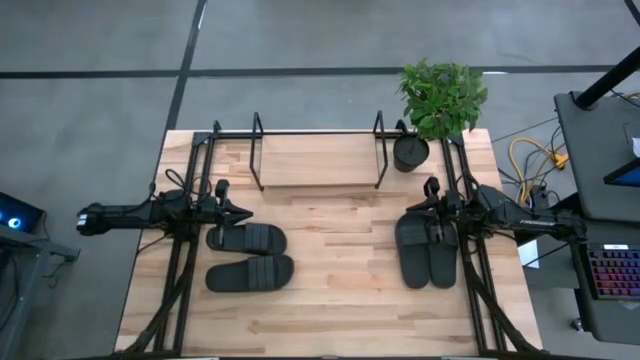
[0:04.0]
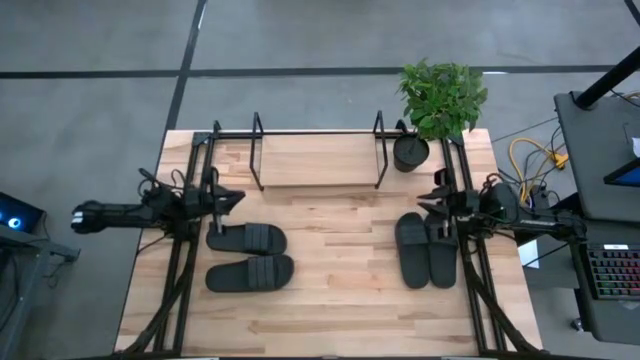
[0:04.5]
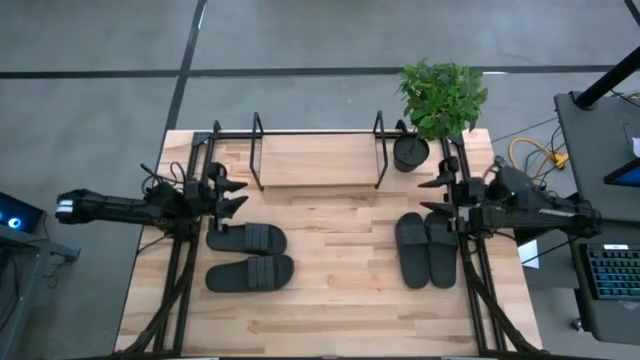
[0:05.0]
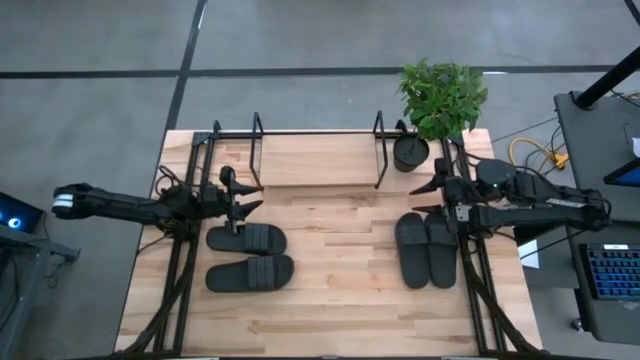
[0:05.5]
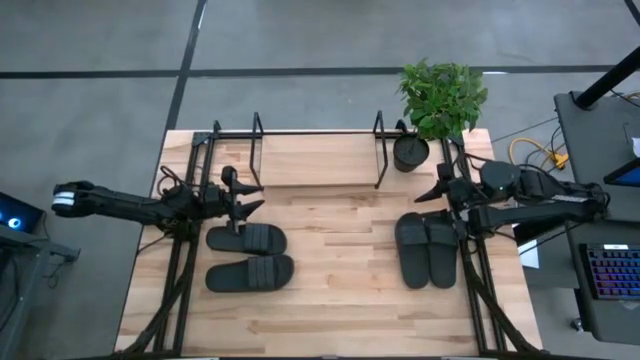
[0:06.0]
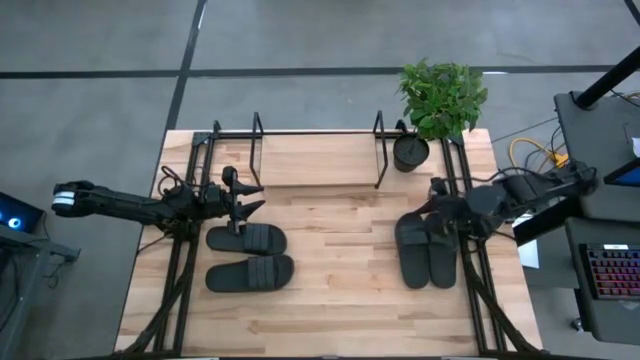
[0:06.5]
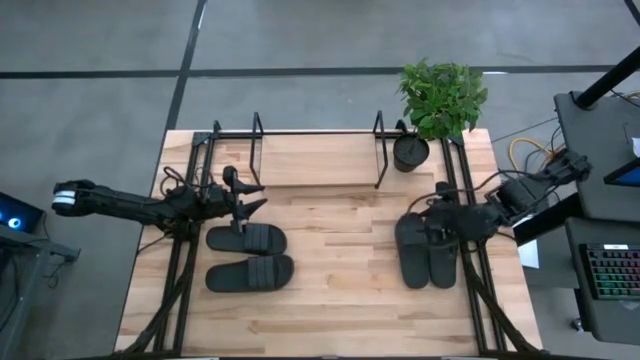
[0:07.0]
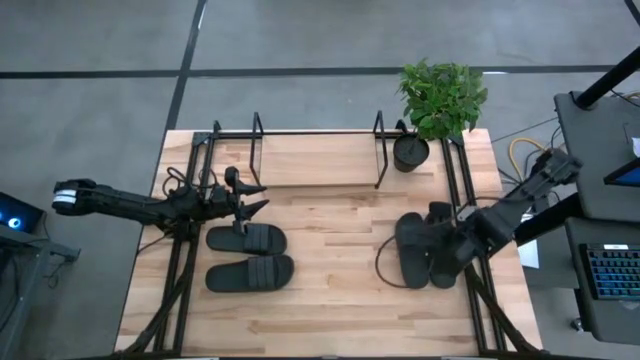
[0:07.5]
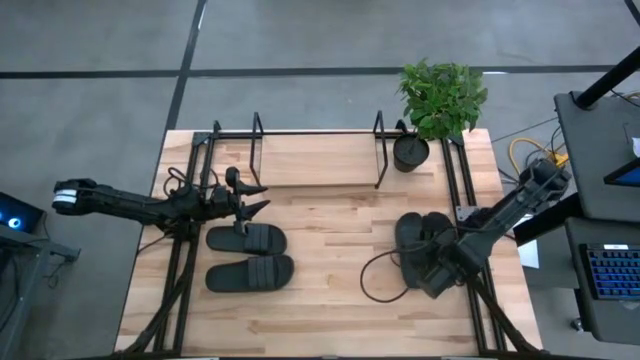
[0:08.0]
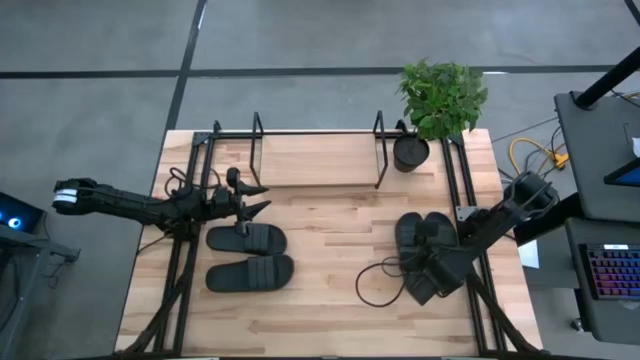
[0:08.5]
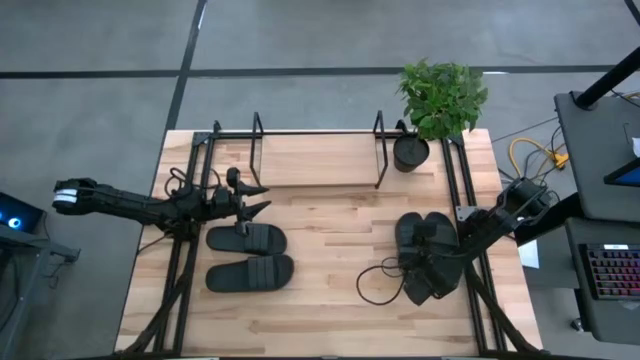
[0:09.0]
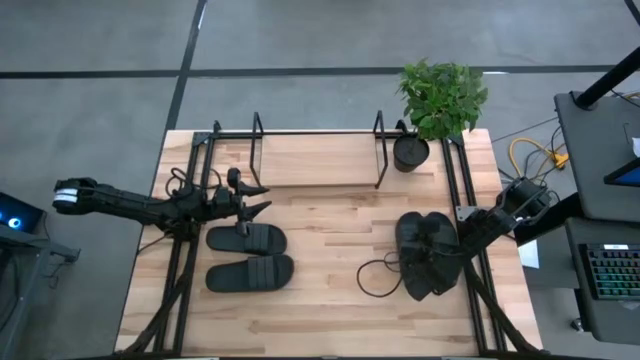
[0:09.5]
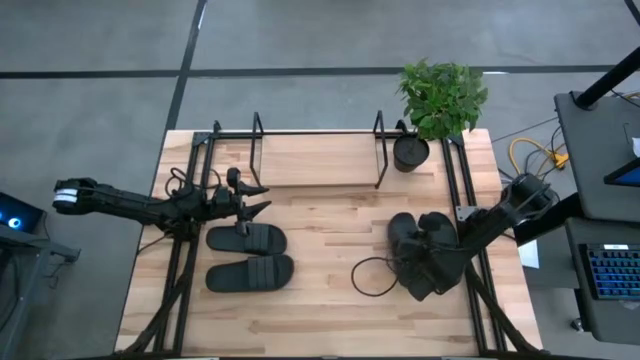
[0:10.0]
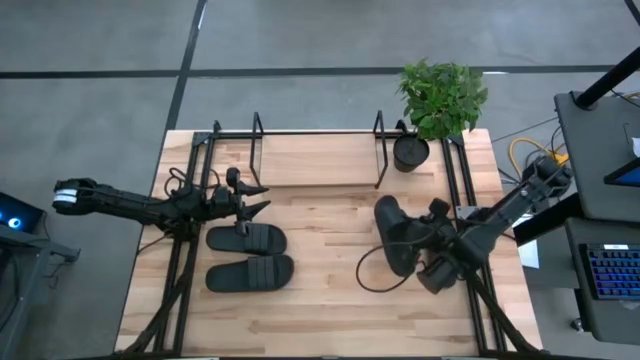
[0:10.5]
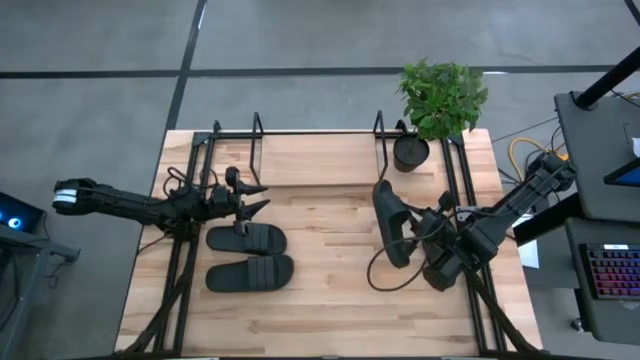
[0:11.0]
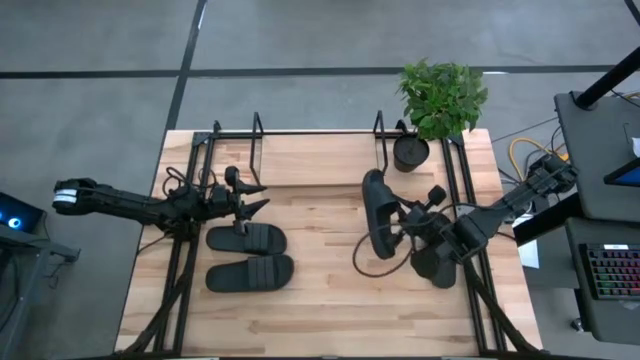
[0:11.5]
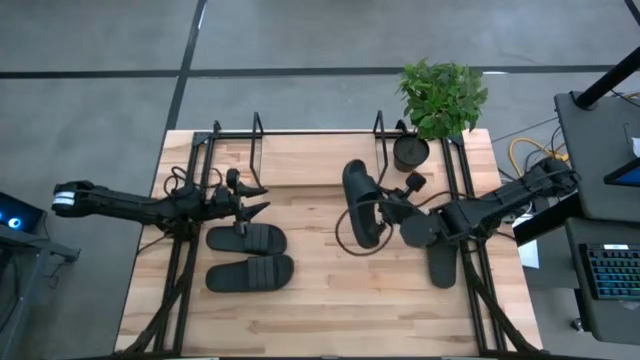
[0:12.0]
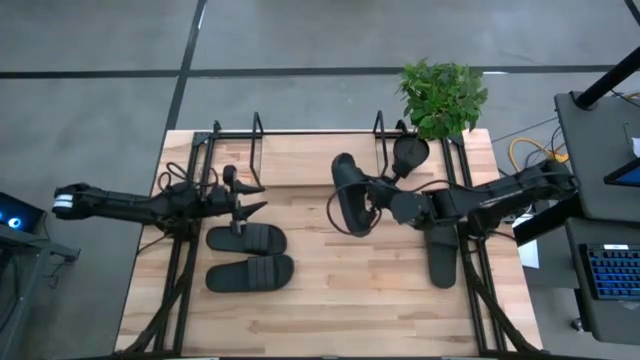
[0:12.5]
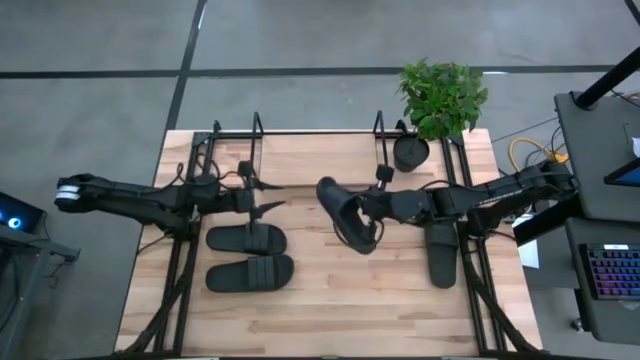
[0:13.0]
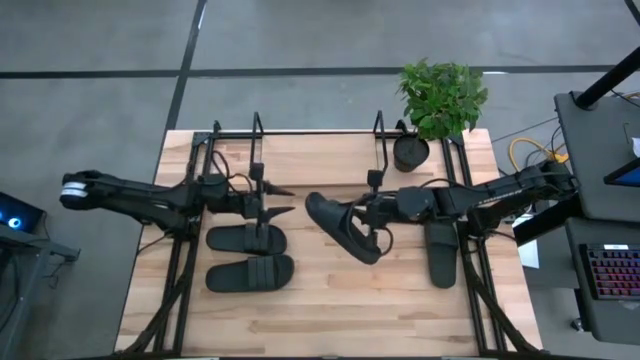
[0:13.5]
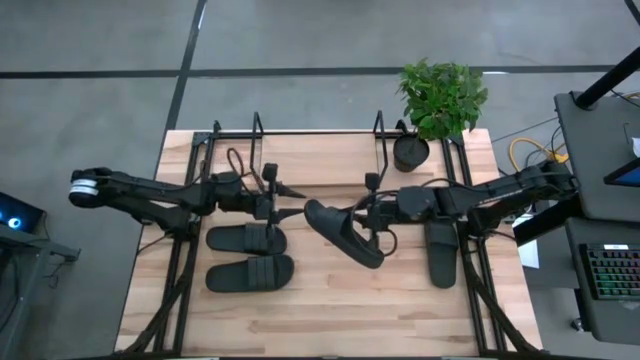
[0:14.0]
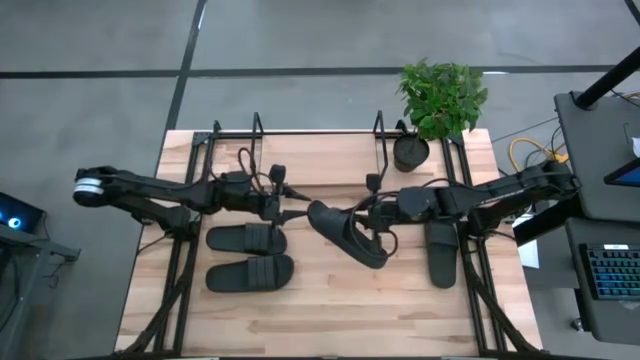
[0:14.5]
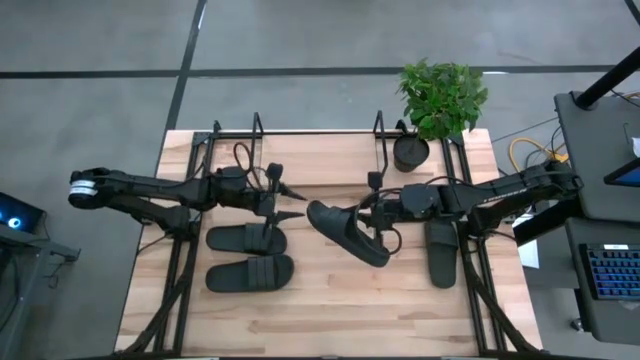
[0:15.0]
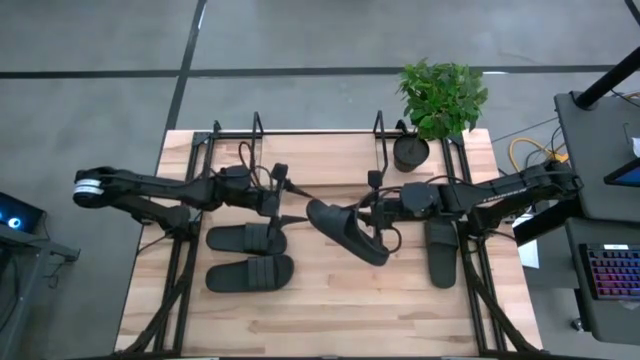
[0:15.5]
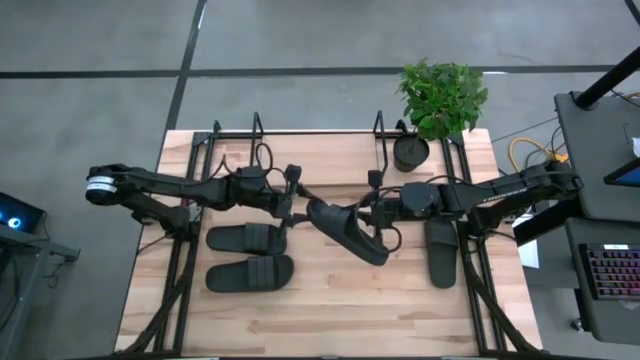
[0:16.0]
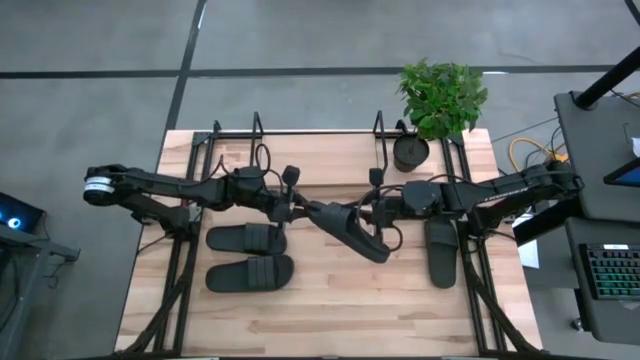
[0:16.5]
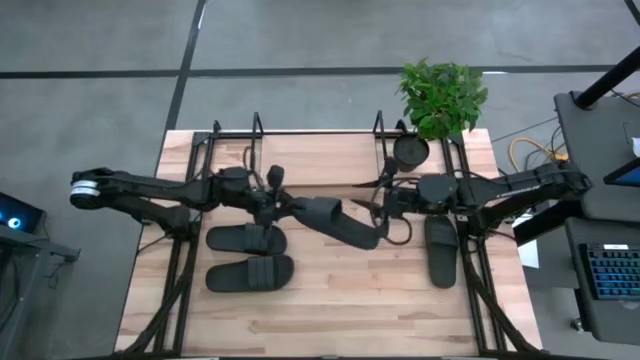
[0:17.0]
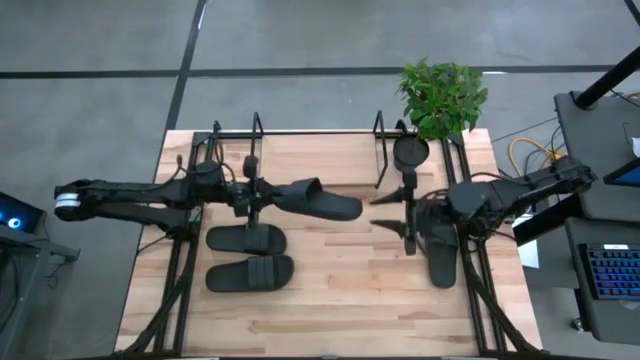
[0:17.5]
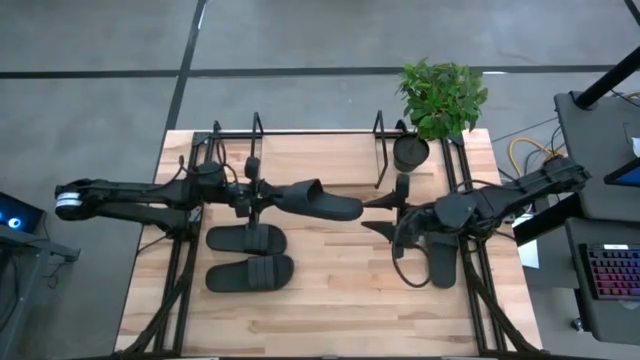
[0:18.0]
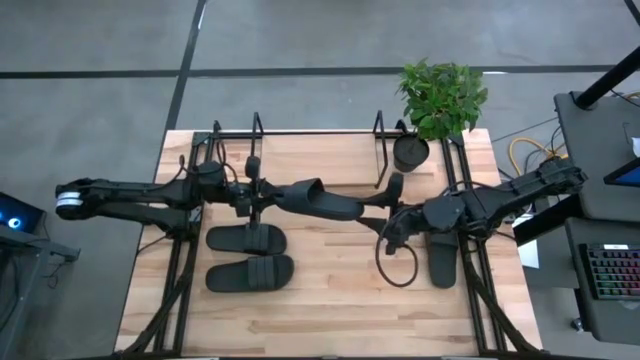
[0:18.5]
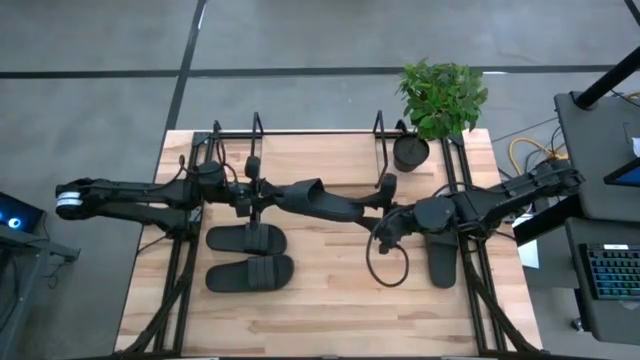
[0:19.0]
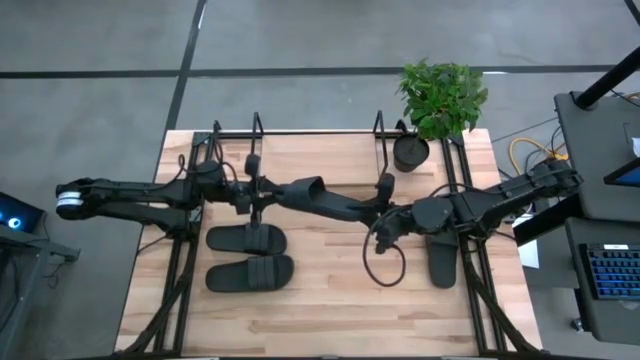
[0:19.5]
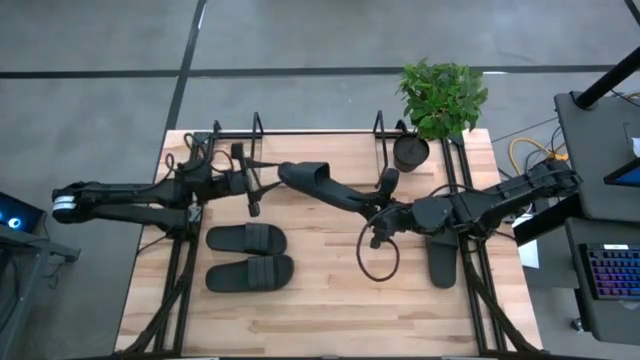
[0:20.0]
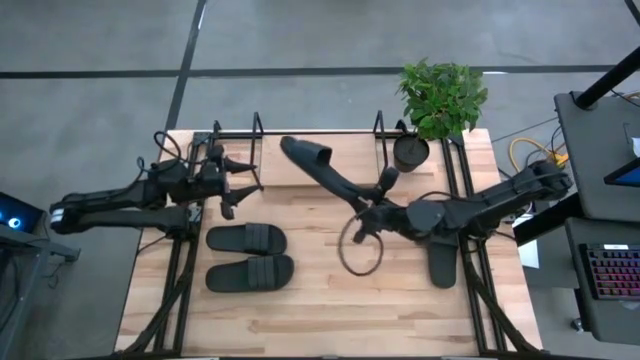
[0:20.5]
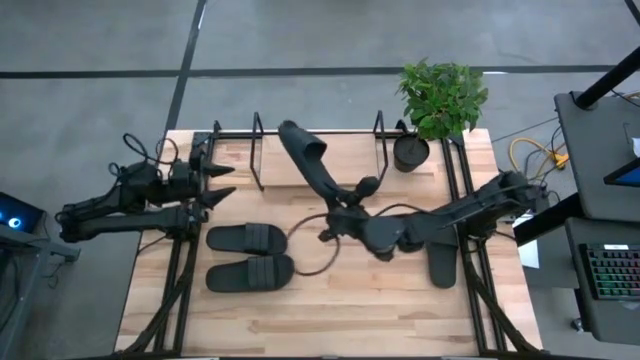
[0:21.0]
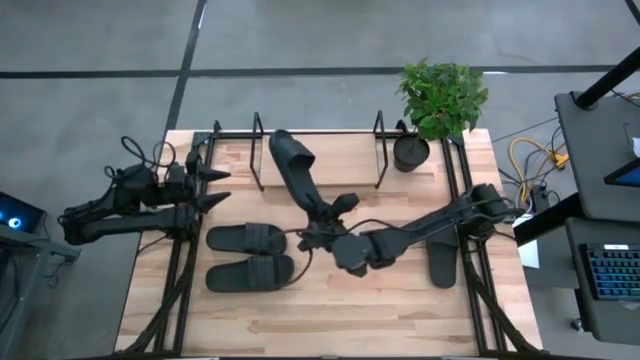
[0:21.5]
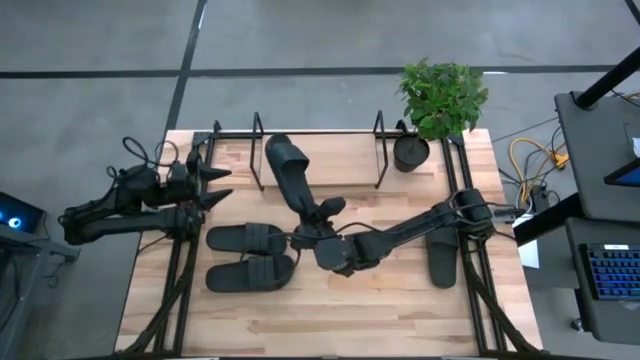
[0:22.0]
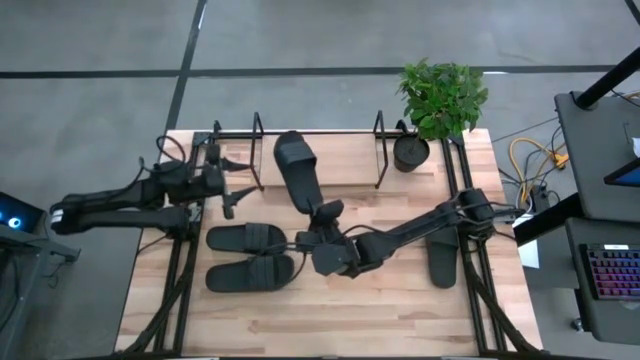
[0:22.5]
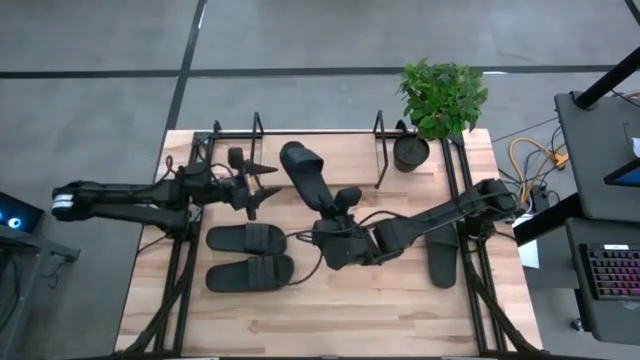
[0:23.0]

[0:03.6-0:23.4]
Task: Pick and place slides into the shelf
Put the black slide on the shelf
